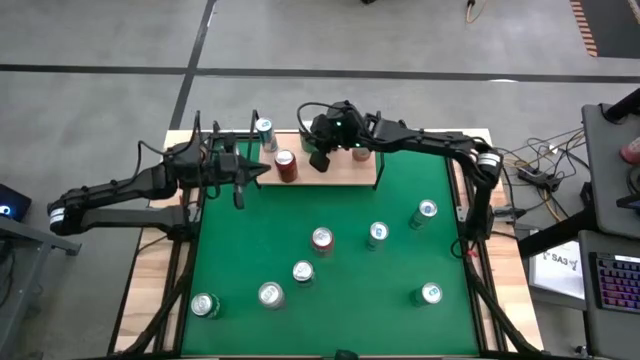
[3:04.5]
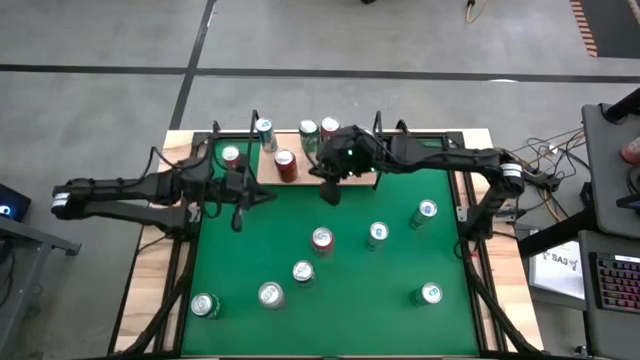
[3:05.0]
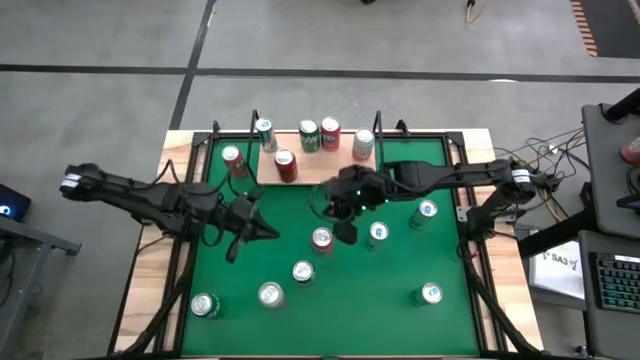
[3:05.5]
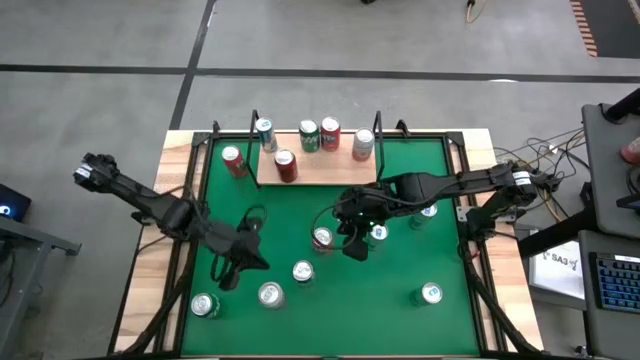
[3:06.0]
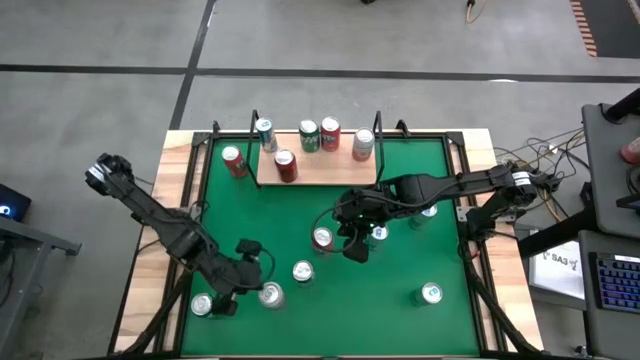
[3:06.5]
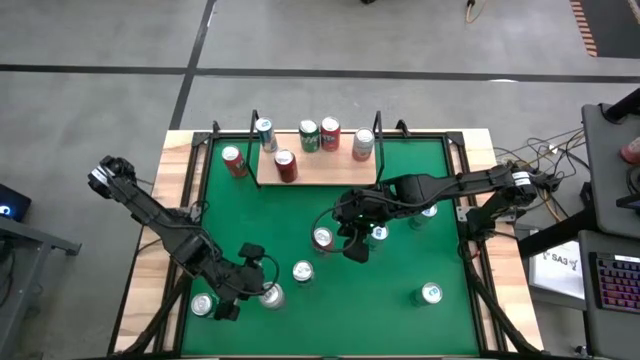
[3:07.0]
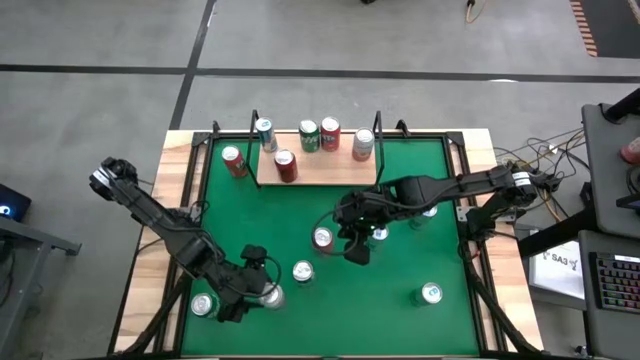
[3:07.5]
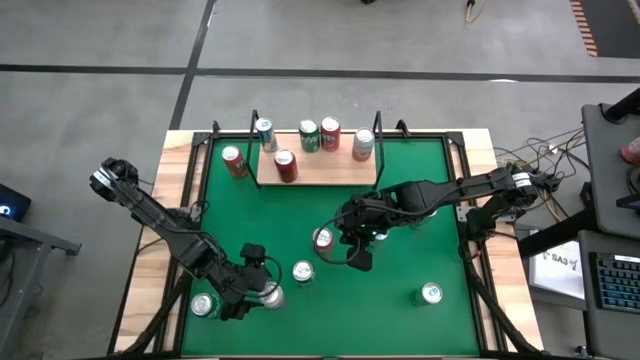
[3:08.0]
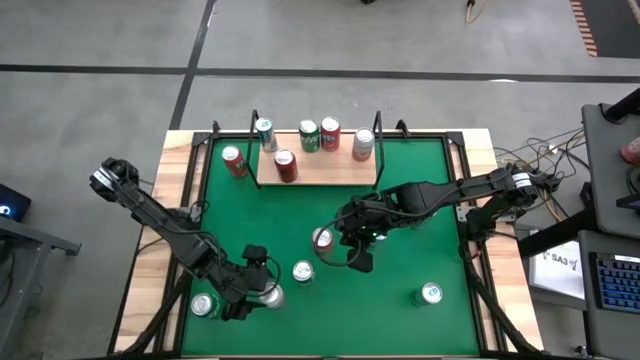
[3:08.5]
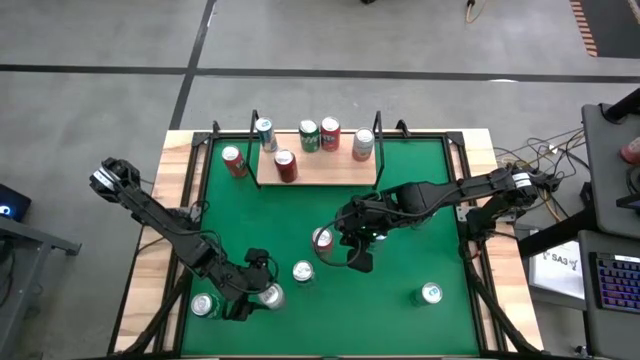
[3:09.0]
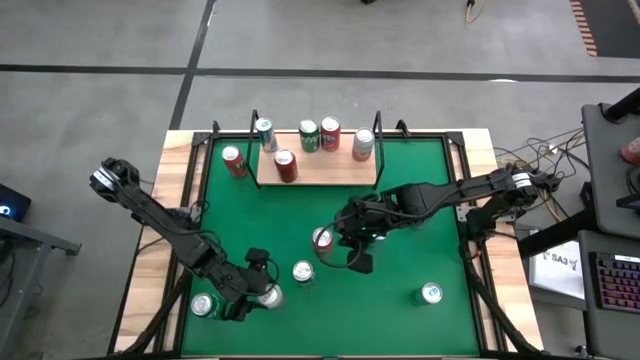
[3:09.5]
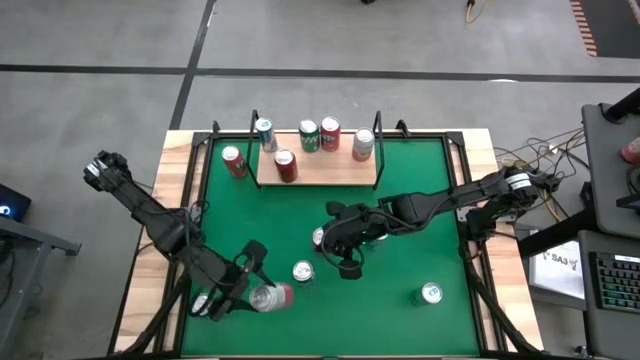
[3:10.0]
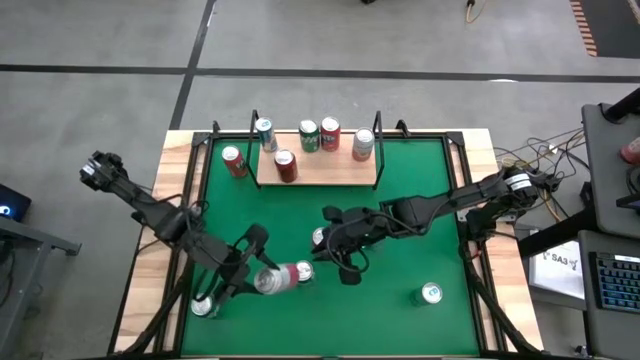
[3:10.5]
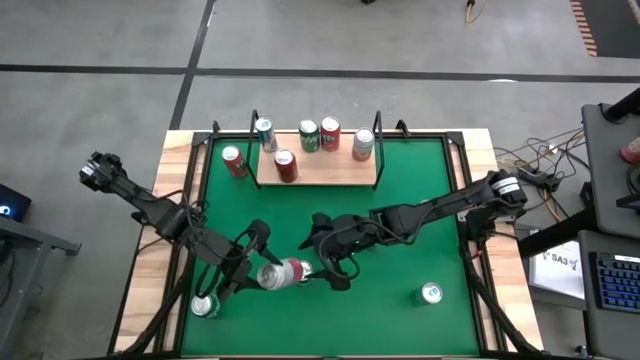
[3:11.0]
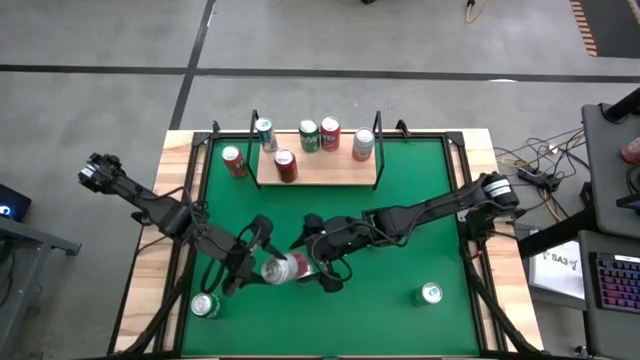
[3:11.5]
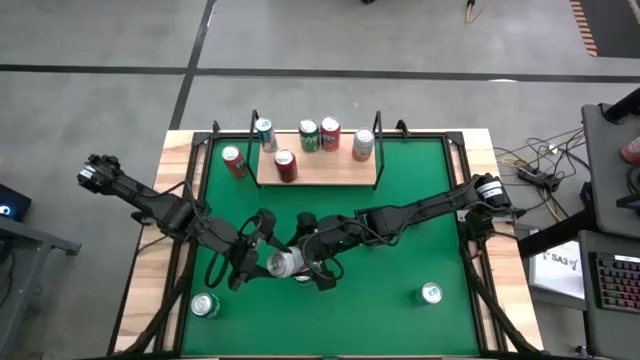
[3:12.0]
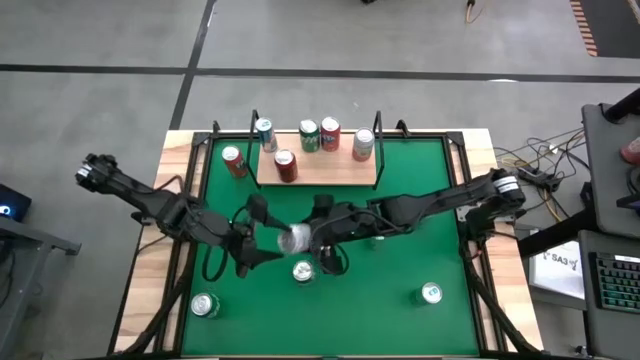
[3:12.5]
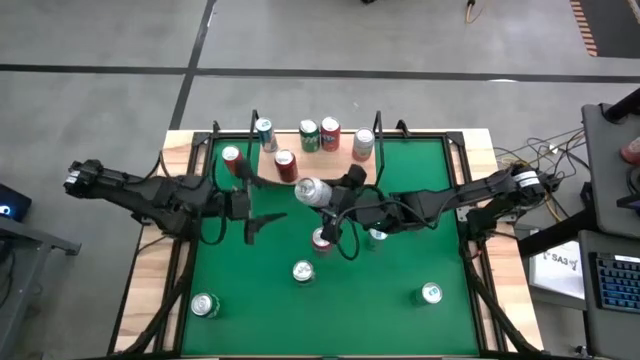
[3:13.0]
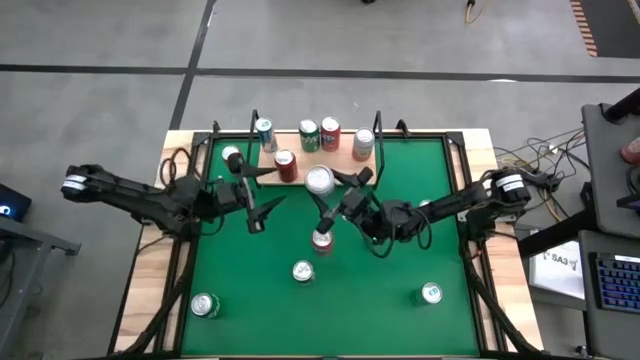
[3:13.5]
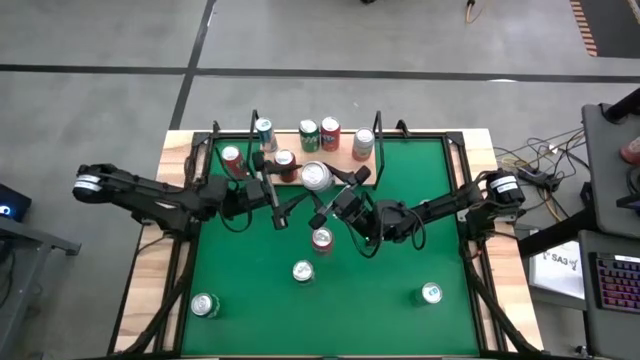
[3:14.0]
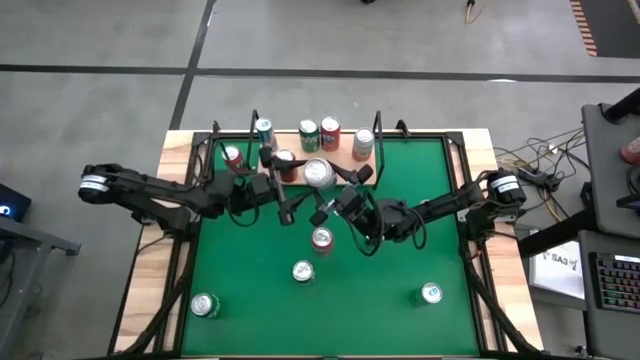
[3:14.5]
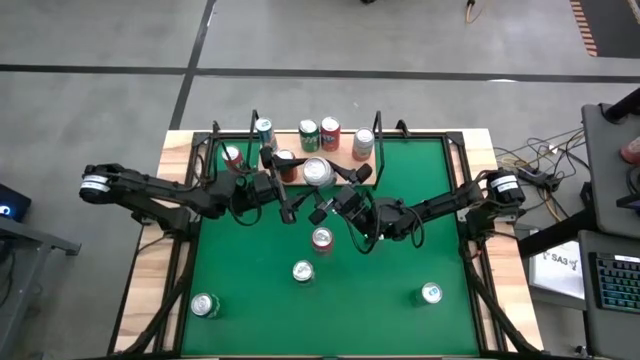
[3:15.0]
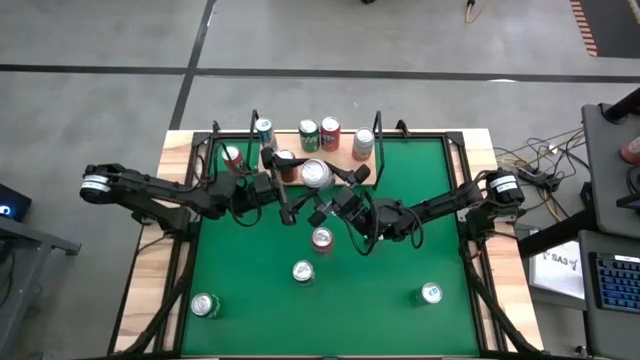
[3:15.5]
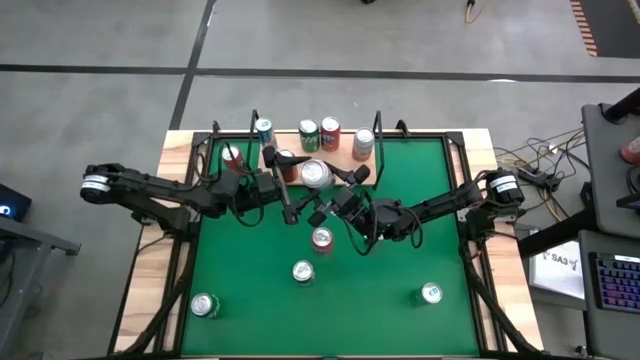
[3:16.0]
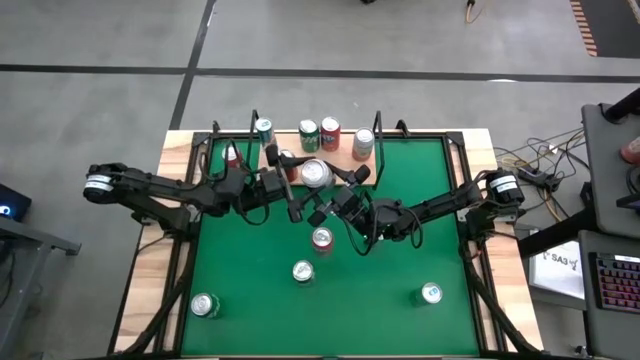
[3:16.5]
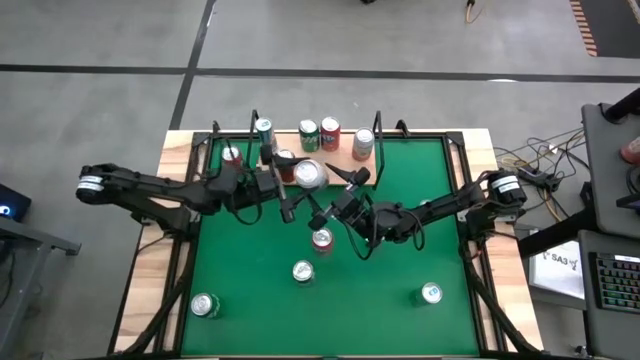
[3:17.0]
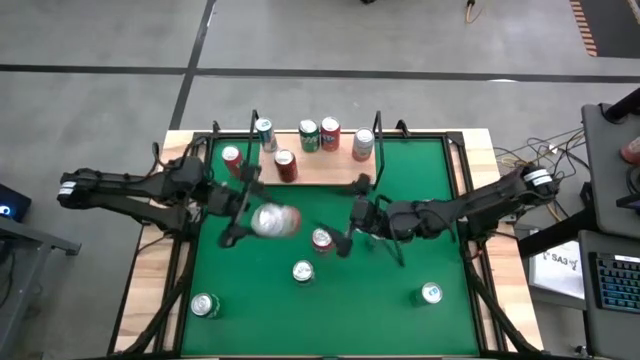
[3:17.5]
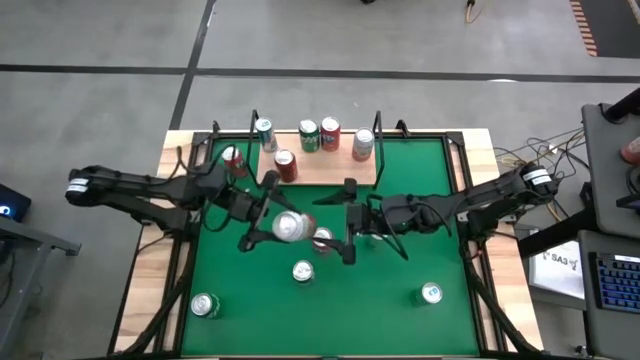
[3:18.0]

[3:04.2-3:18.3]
Task: Pick and place cans onto a shelf
Put the pink white soda can on the shelf aligned with the other pink white soda can

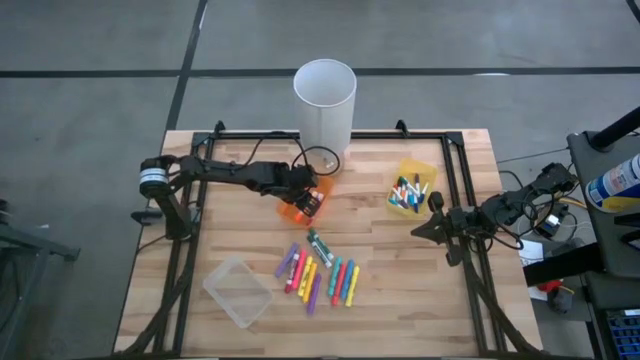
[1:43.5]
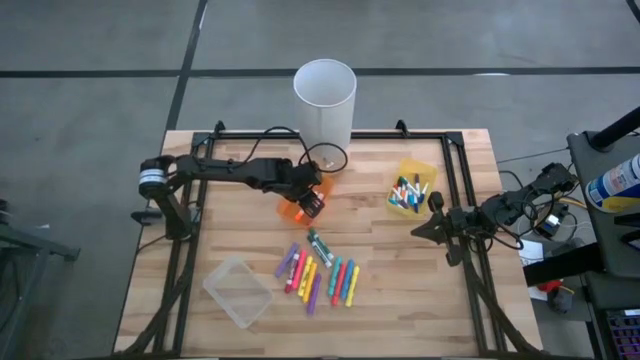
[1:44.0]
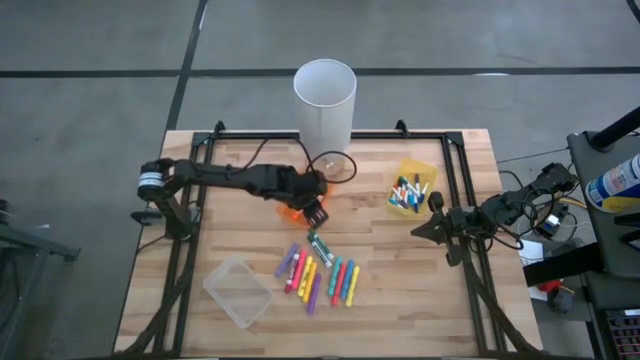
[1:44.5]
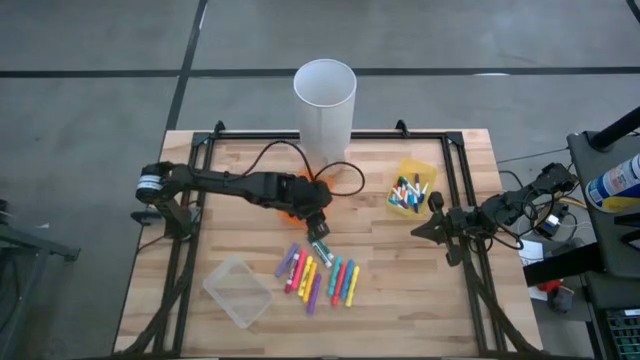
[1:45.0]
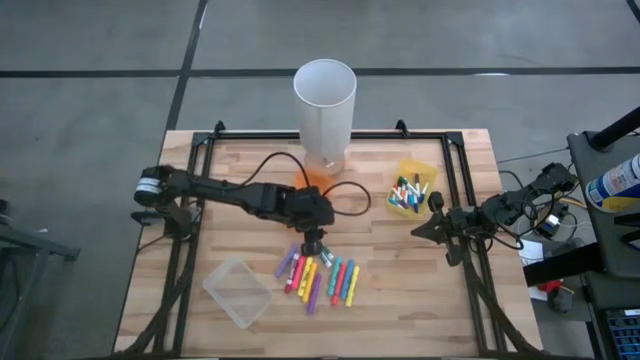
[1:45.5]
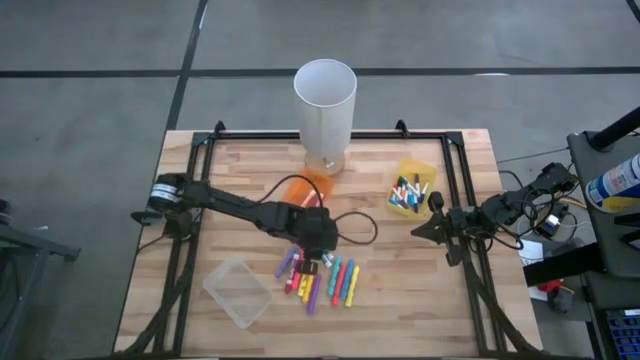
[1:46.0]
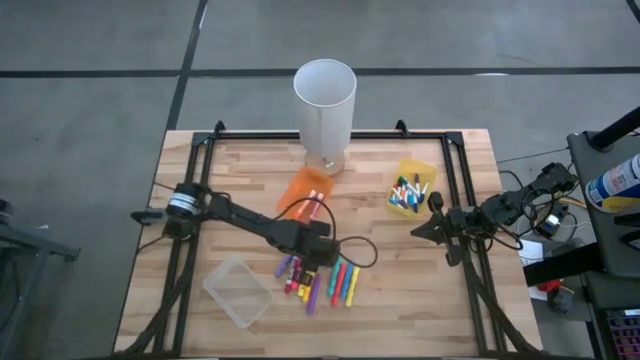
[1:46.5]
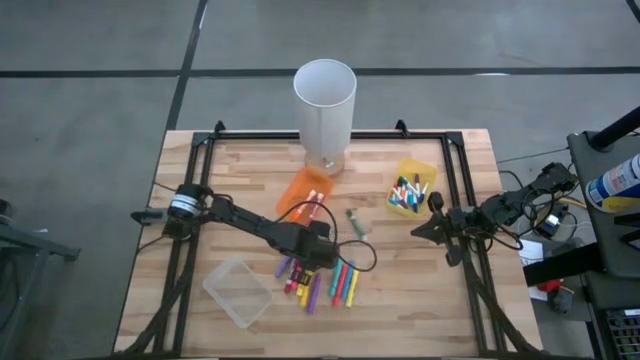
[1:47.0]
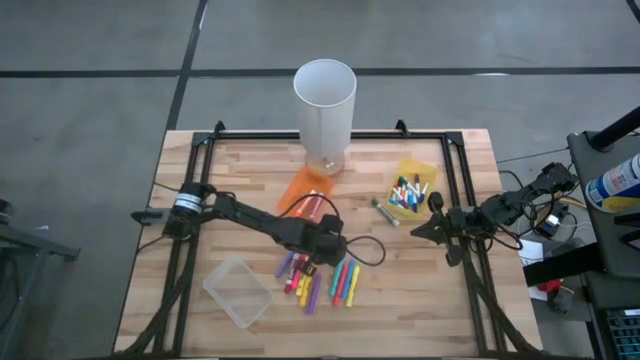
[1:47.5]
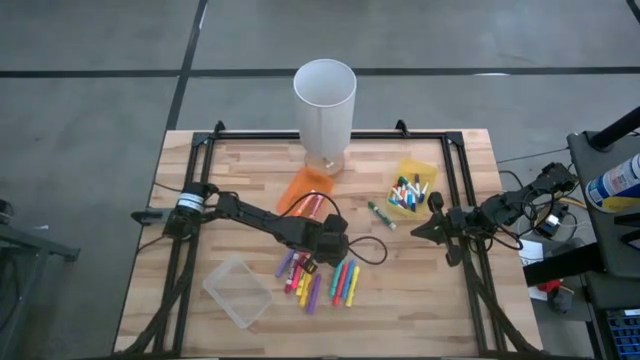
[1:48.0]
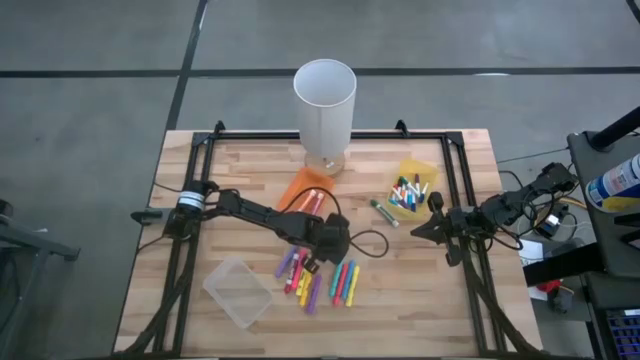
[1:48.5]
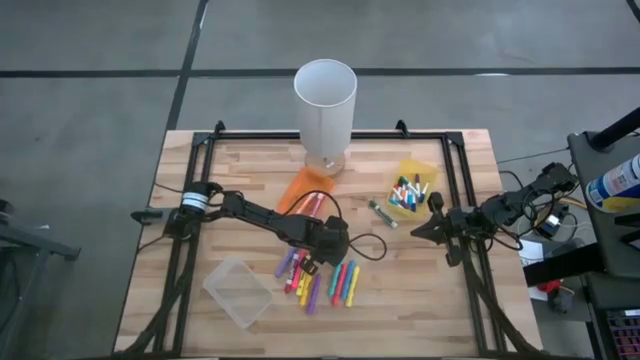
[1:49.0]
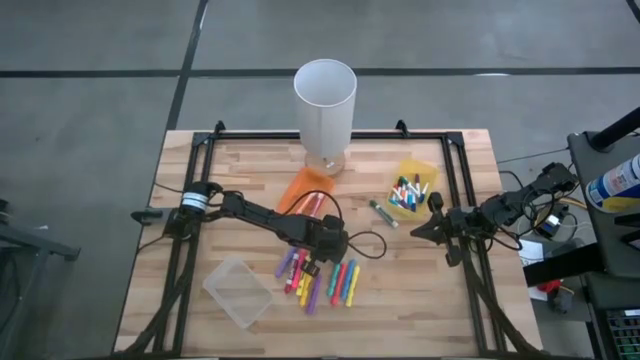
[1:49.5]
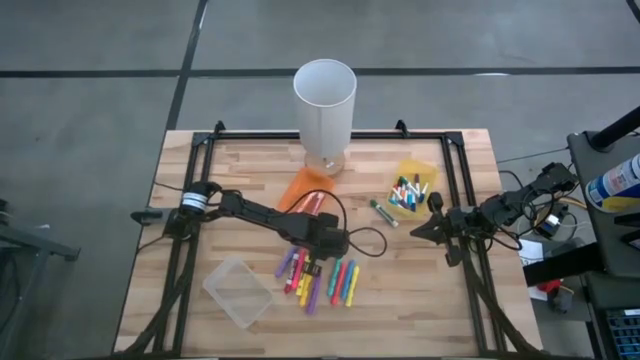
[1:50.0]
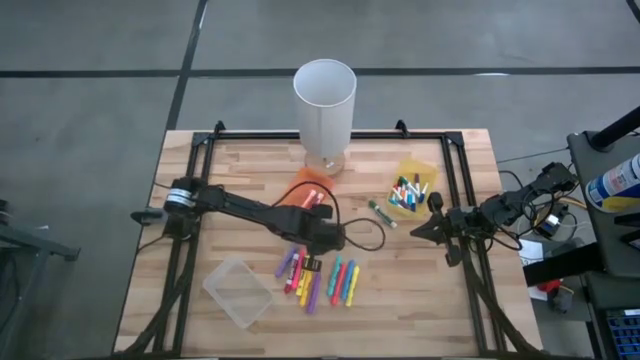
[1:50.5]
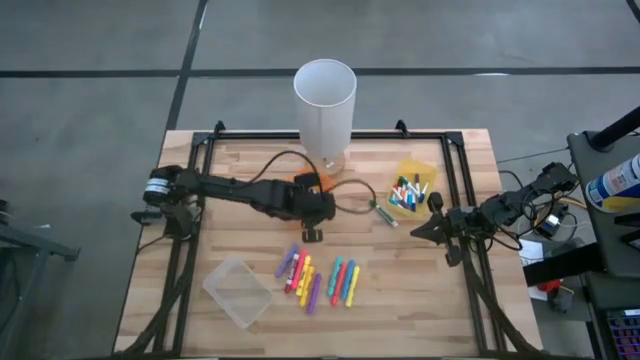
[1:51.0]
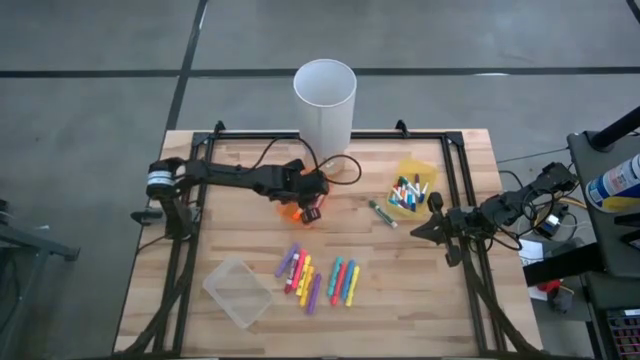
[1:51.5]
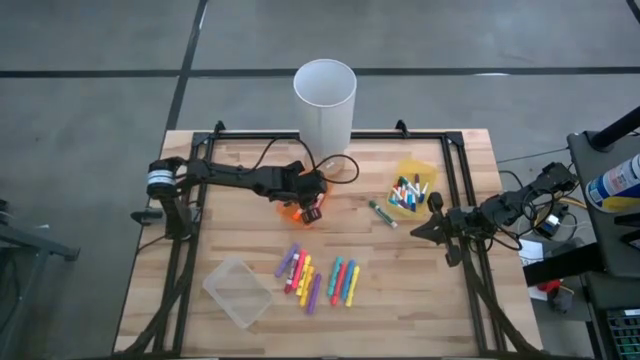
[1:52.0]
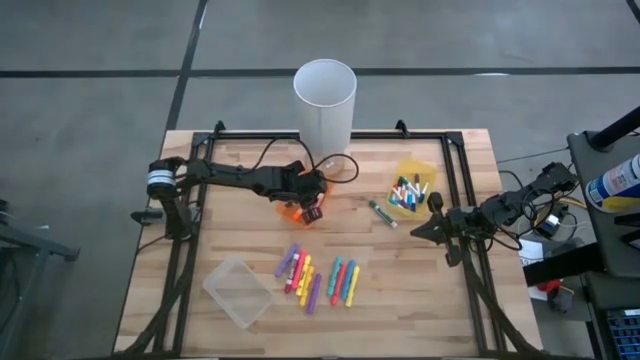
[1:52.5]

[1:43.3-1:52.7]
Task: Pick & Place Markers
Put the large dark green marker pen into the orange bin
